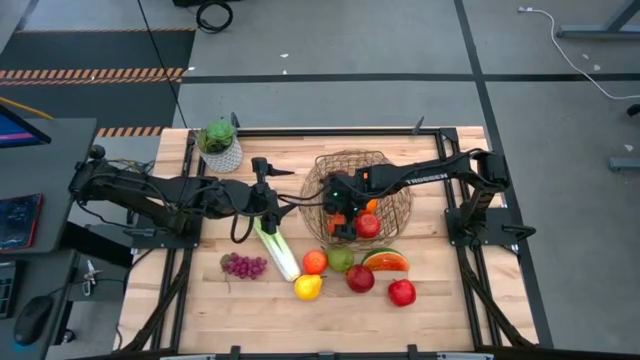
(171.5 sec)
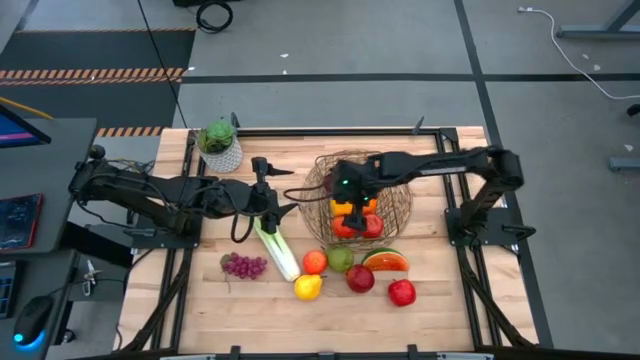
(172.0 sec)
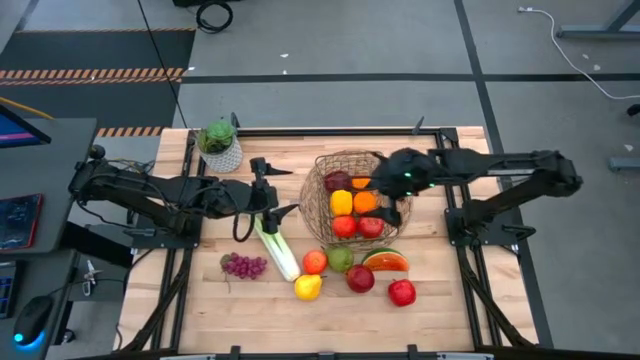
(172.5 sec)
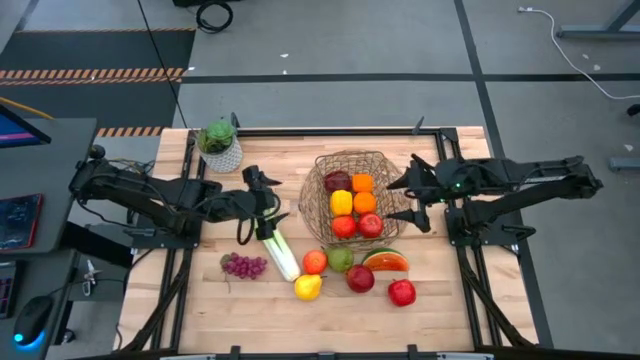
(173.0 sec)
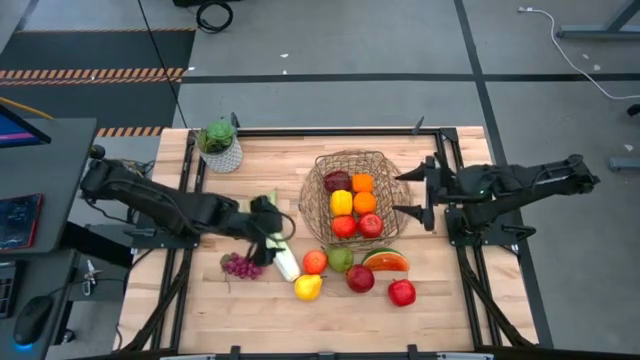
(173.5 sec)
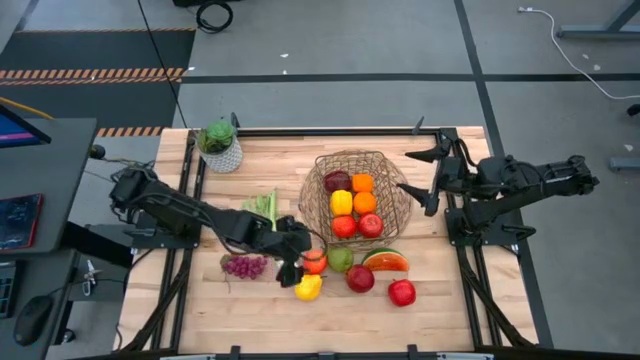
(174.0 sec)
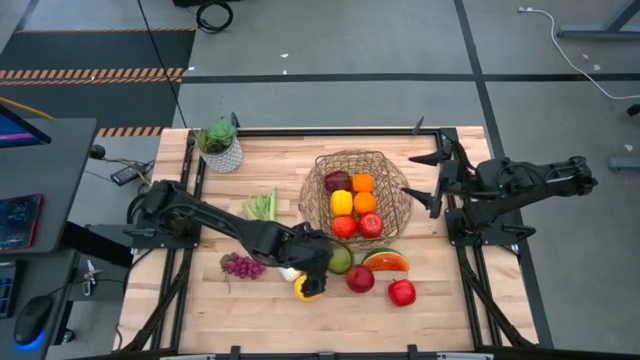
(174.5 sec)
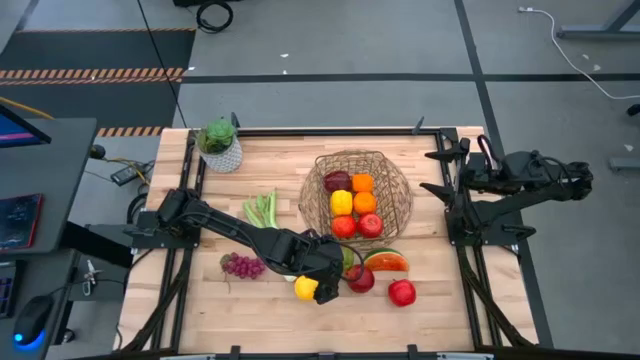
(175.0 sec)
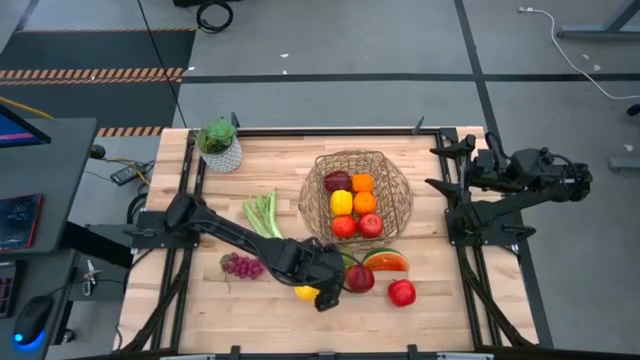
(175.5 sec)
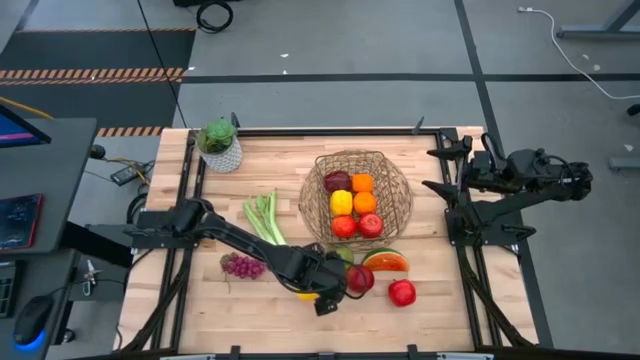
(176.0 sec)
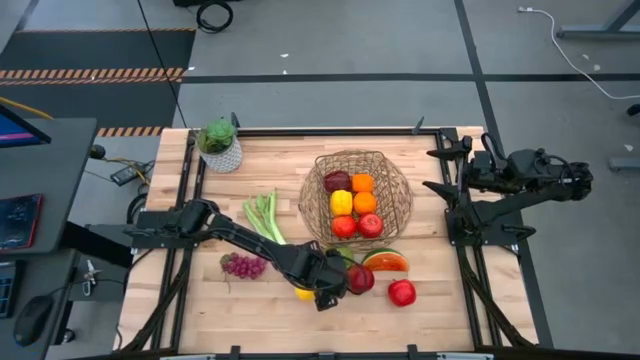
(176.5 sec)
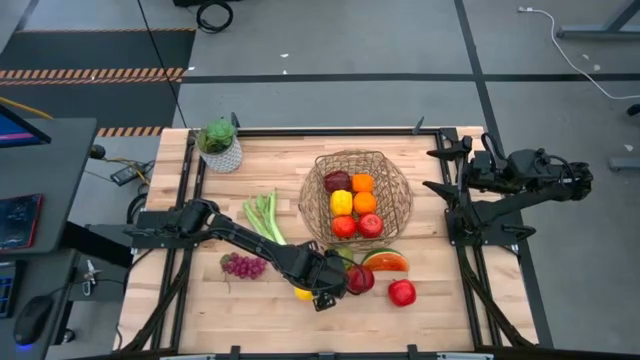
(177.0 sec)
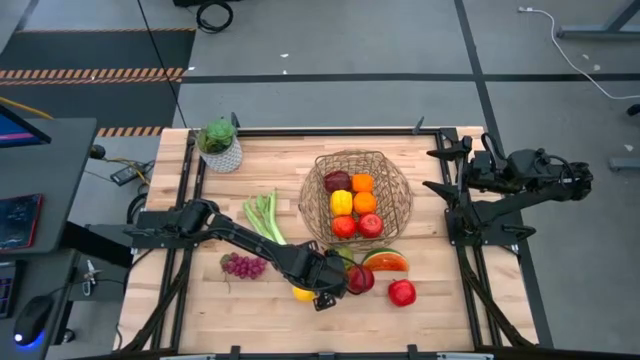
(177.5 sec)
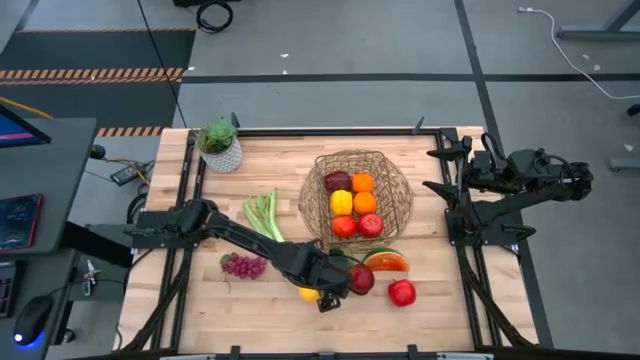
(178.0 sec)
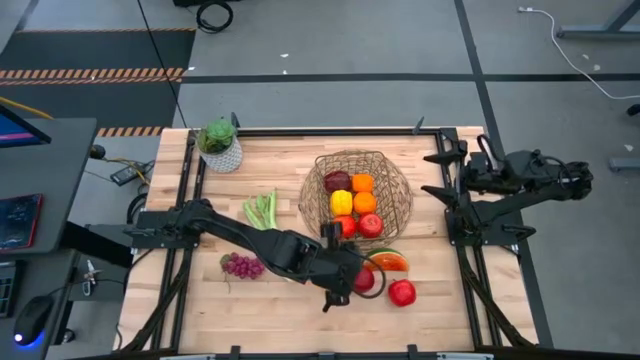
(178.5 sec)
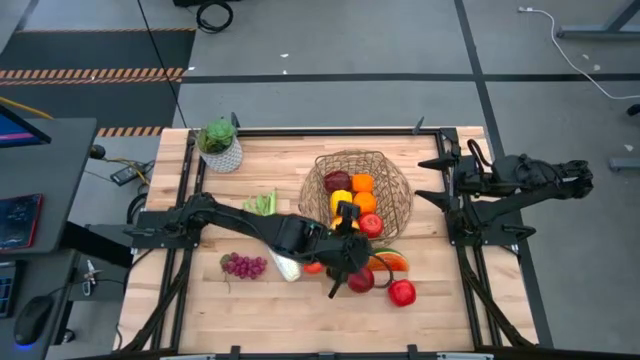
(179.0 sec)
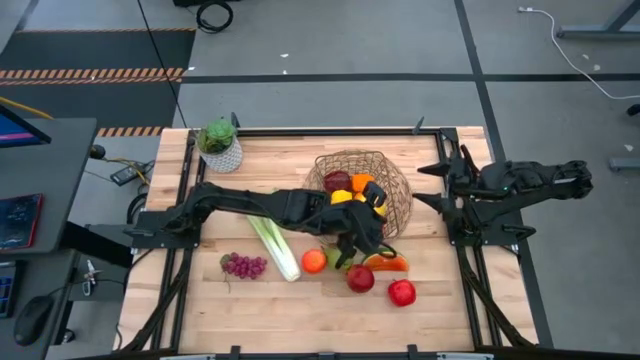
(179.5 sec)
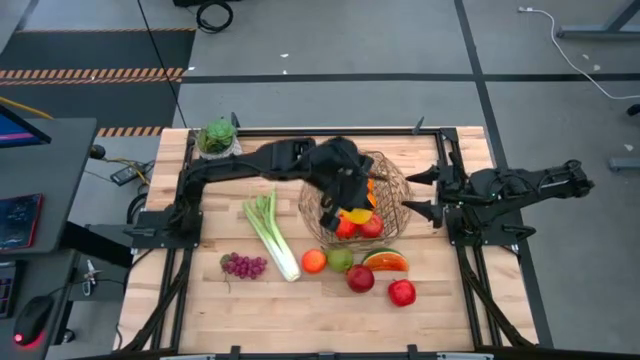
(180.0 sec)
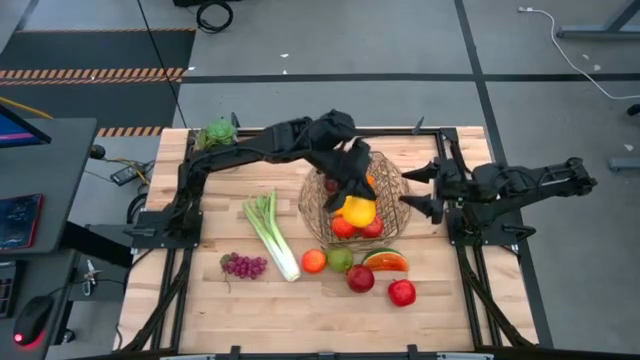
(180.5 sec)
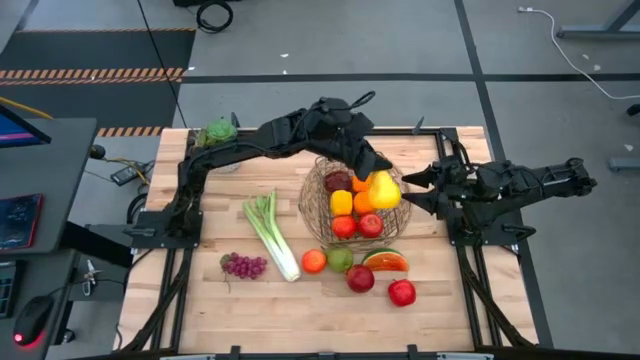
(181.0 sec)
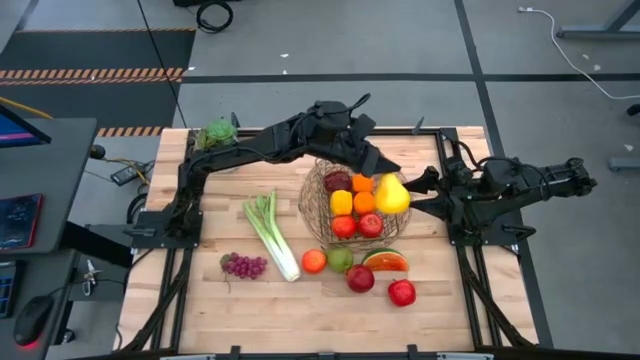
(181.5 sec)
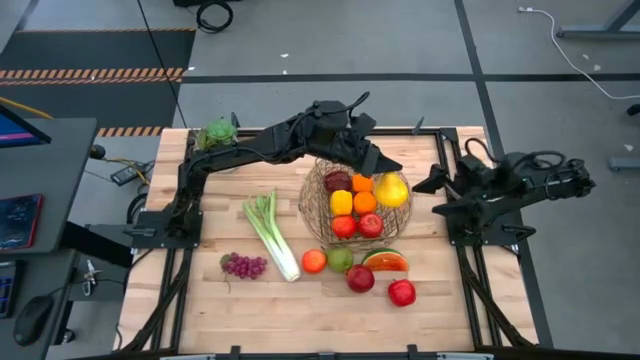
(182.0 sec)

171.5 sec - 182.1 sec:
Task: Build produce basket
Put the yellow pear into the brown wire basket

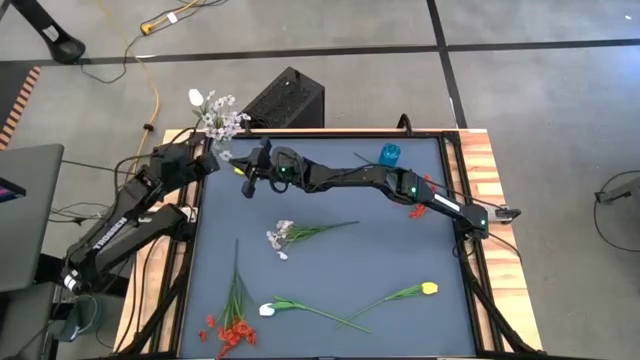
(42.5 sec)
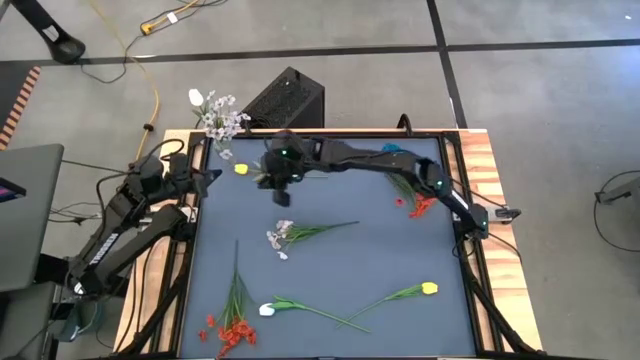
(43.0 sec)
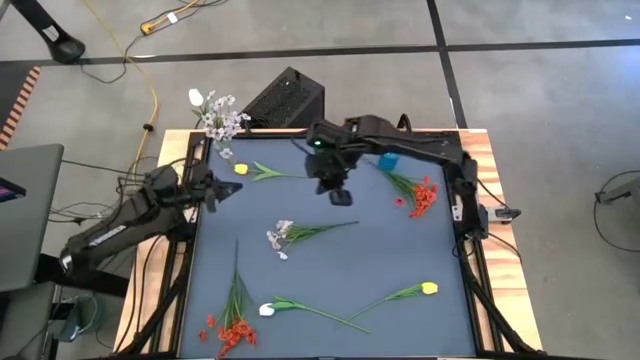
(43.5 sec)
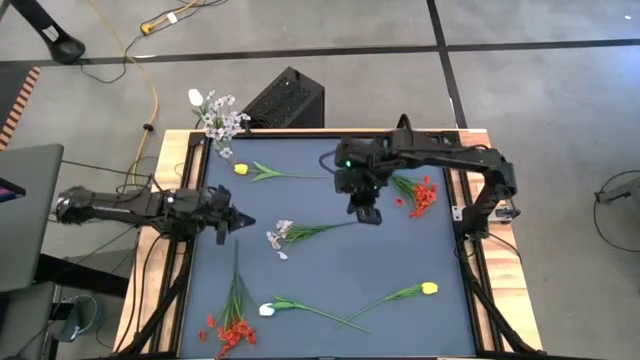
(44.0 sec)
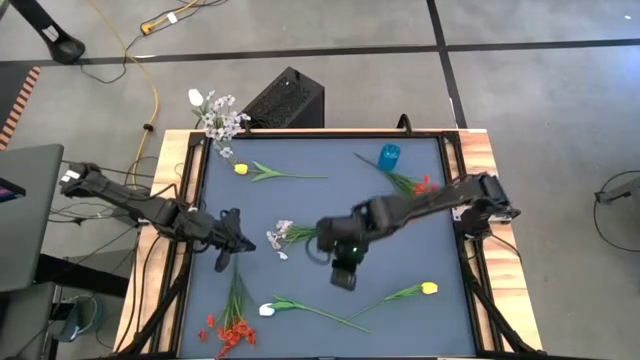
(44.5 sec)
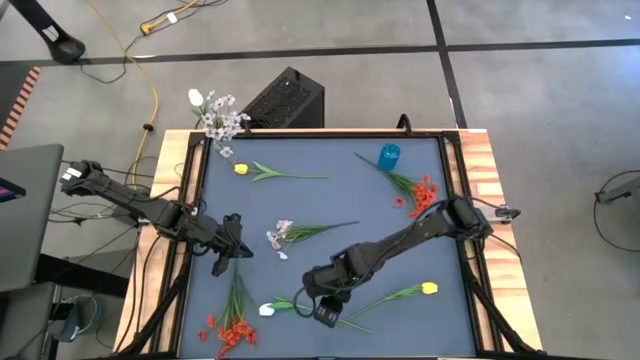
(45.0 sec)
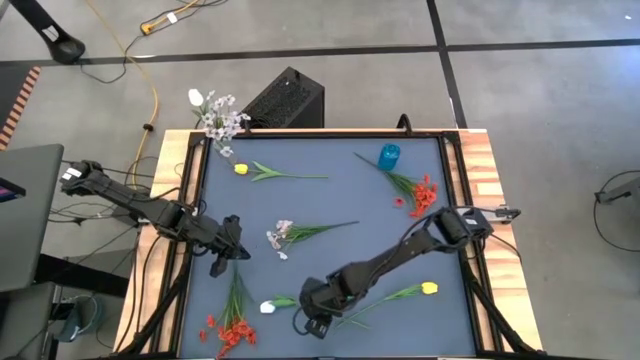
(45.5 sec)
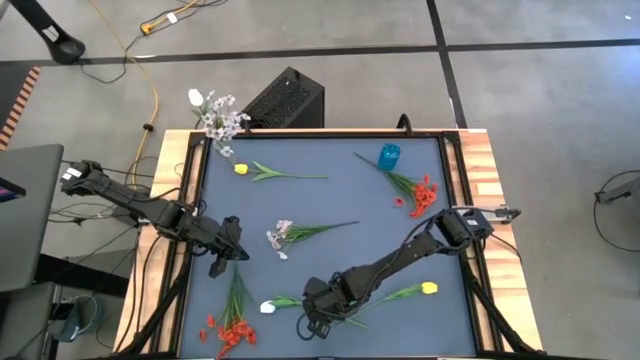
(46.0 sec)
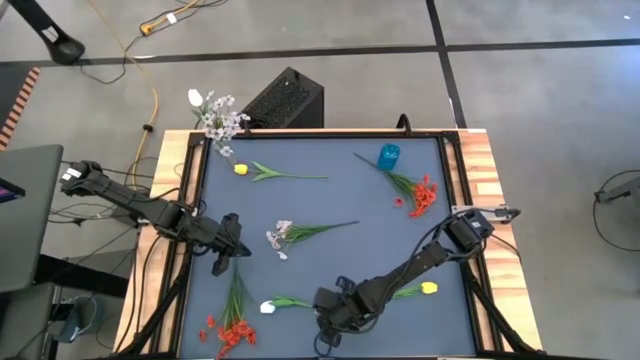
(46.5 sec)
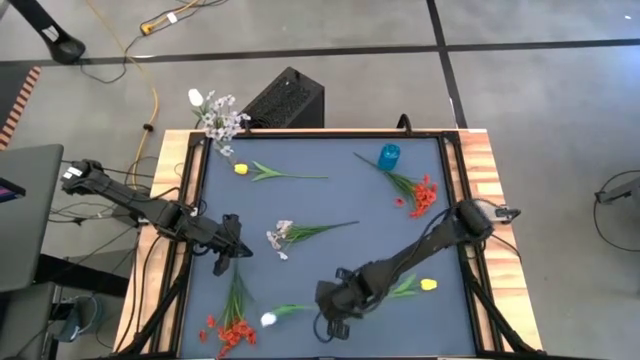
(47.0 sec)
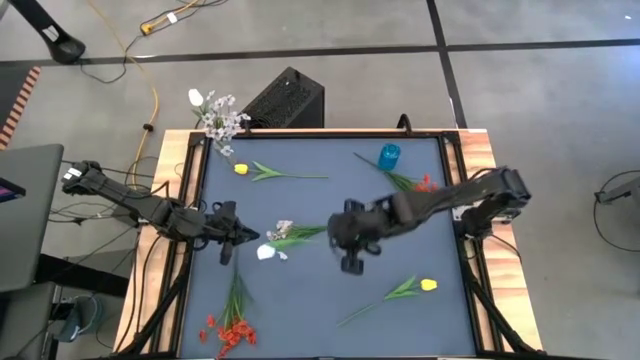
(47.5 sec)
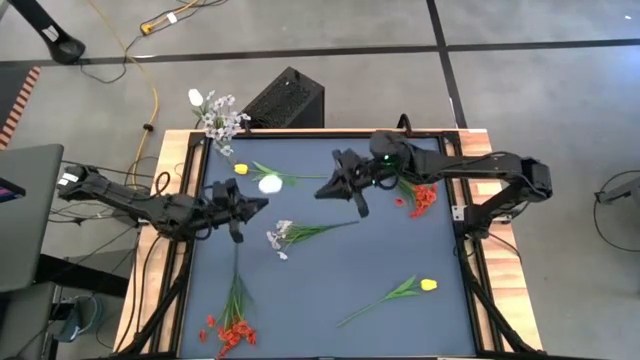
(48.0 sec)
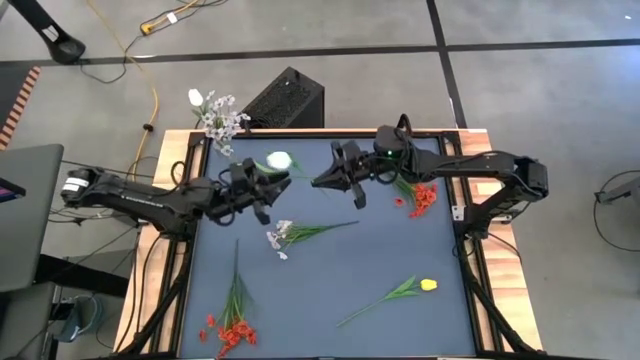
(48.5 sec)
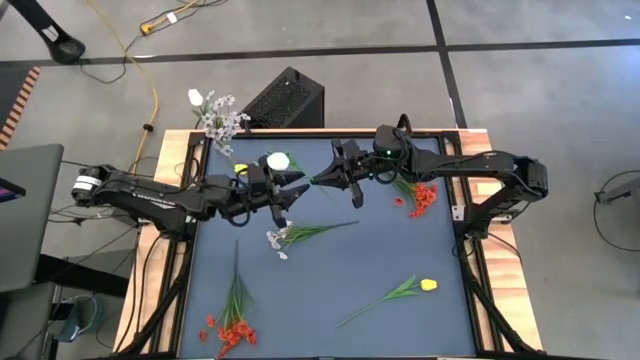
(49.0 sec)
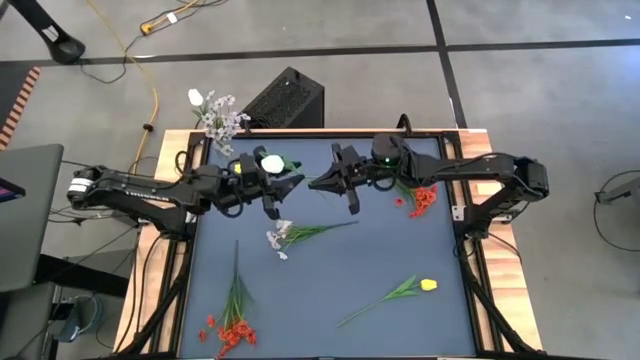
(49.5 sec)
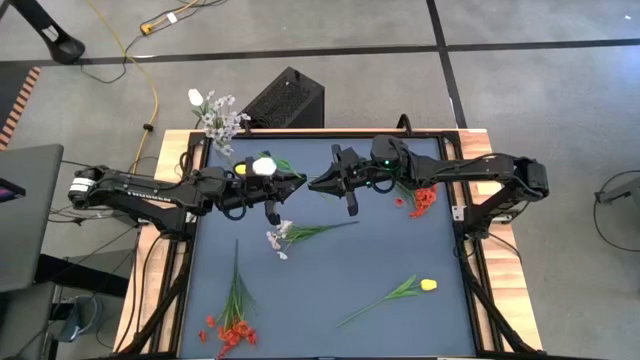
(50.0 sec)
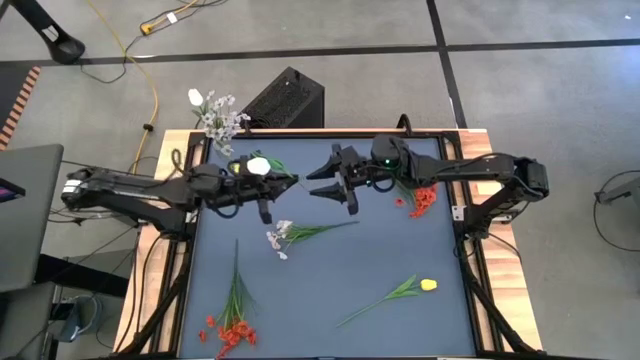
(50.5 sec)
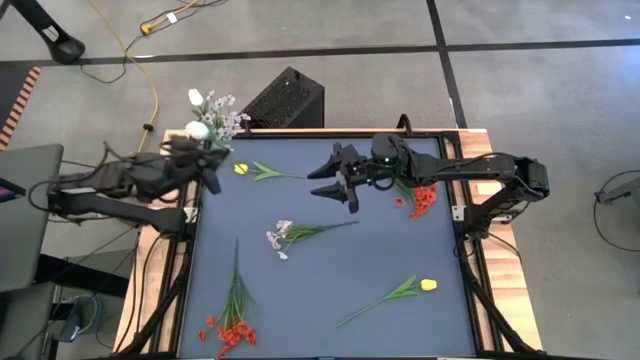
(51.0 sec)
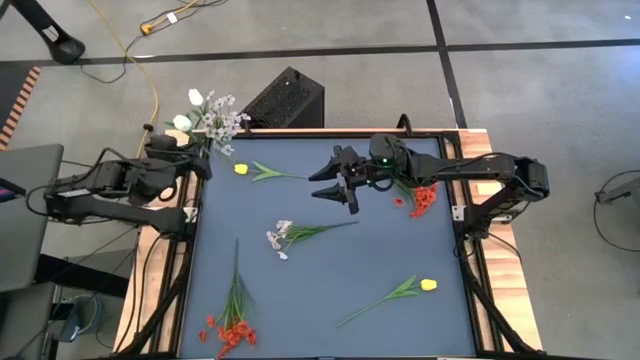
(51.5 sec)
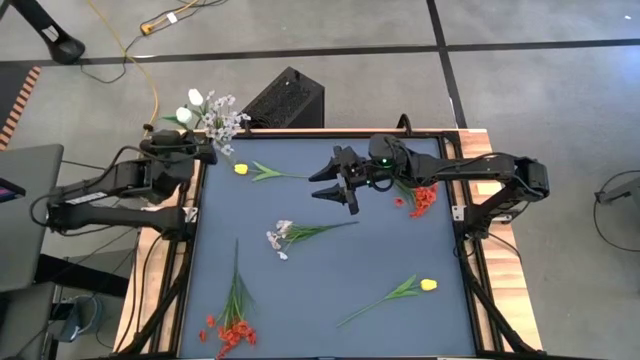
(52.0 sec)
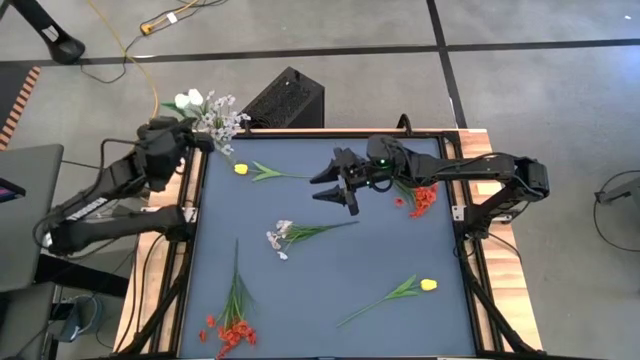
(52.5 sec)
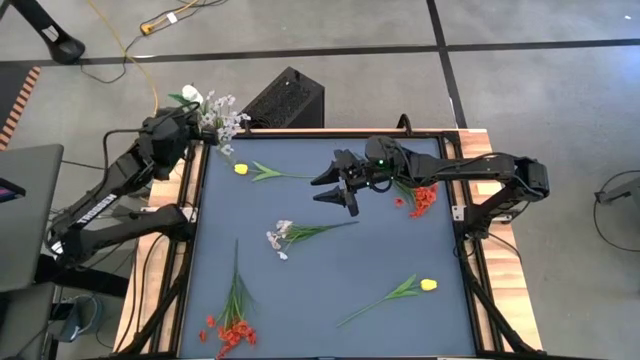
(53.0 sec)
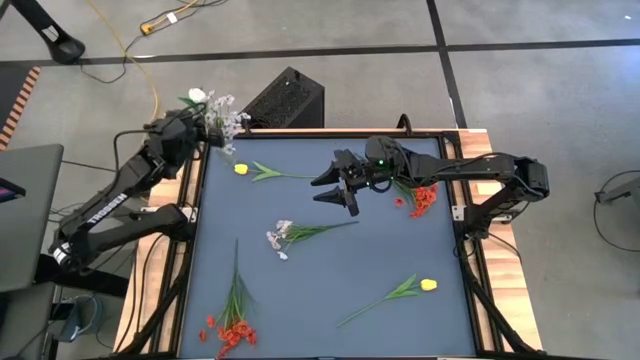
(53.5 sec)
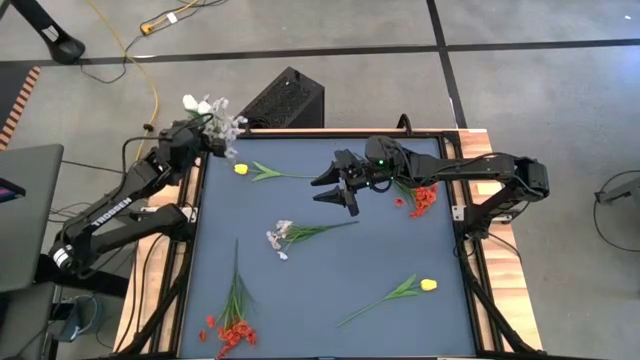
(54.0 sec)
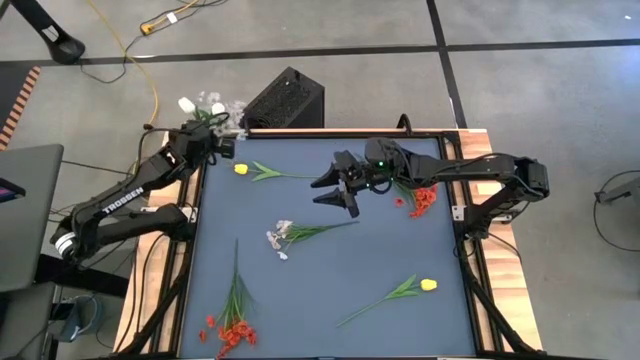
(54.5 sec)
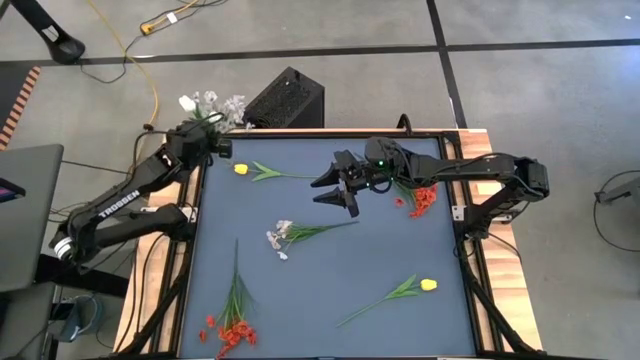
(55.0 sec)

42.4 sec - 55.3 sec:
Task: Sort flowers into vase by color
Put the white flower into the transparent vase
